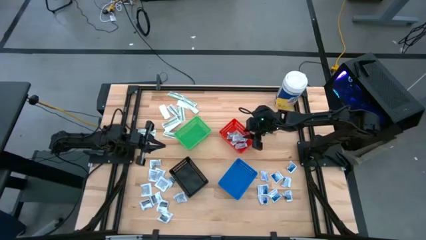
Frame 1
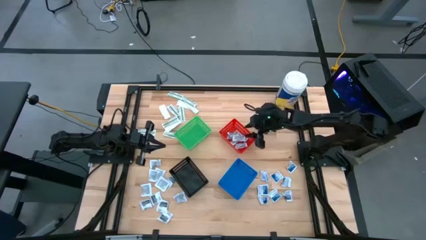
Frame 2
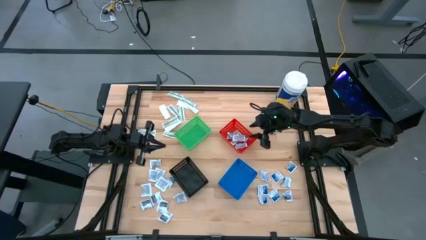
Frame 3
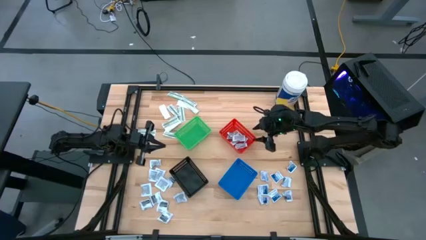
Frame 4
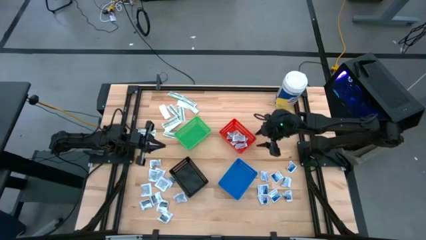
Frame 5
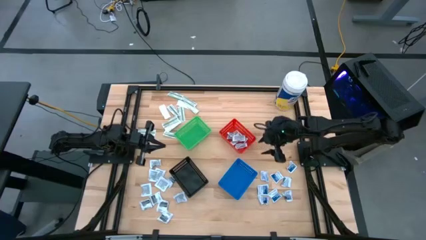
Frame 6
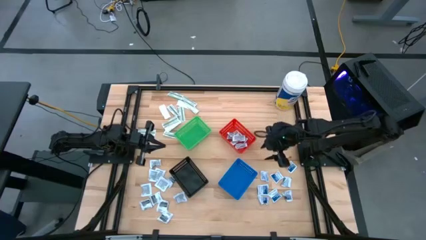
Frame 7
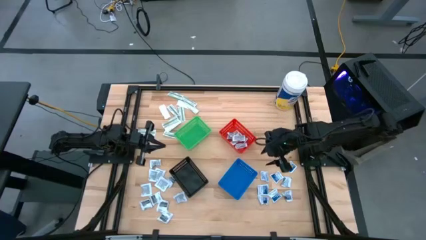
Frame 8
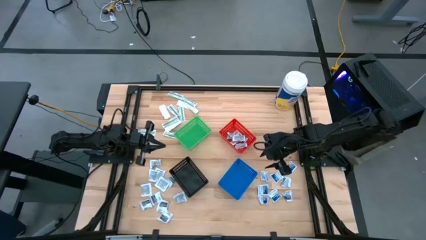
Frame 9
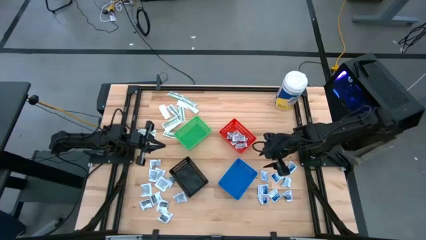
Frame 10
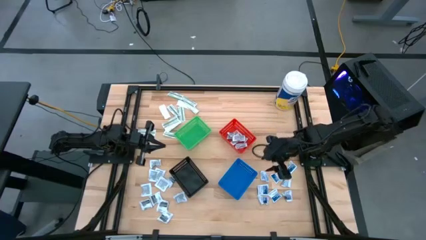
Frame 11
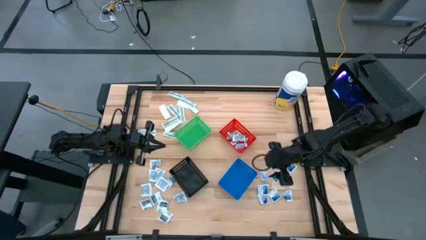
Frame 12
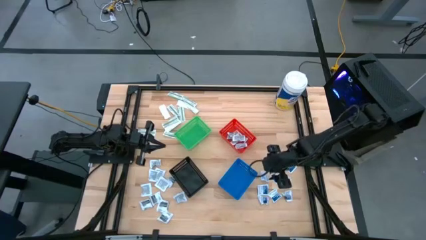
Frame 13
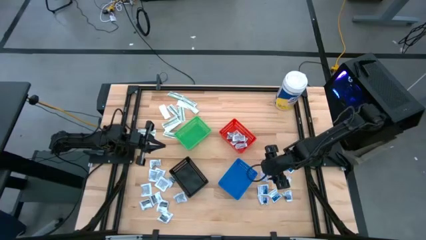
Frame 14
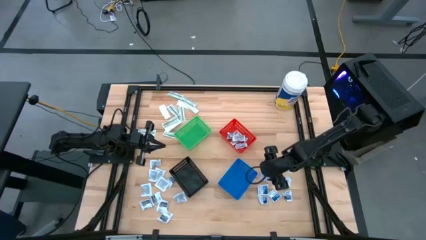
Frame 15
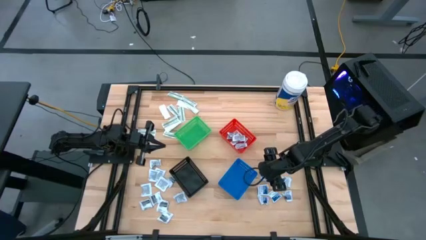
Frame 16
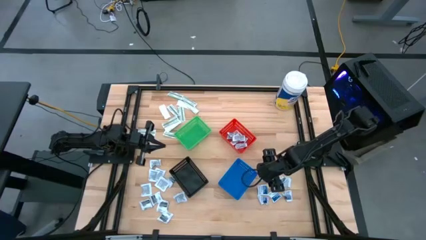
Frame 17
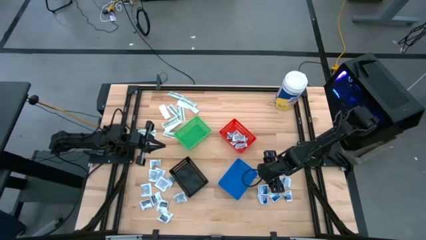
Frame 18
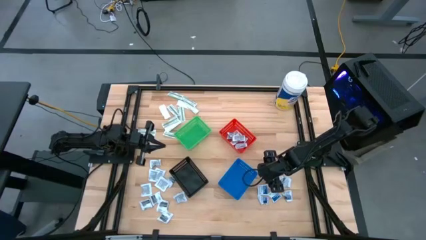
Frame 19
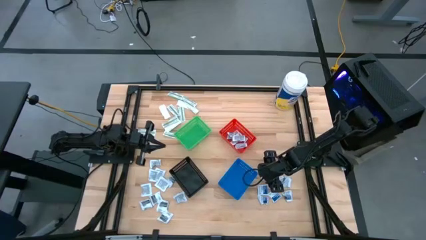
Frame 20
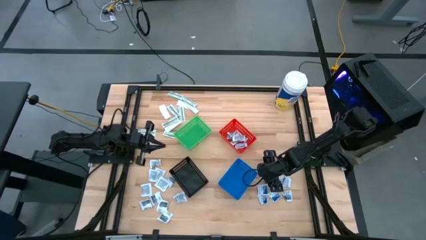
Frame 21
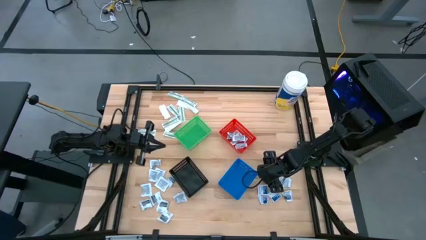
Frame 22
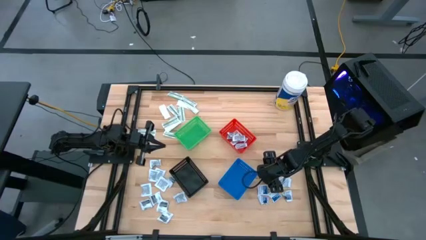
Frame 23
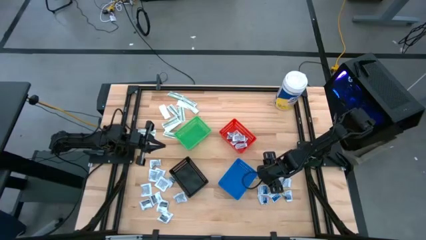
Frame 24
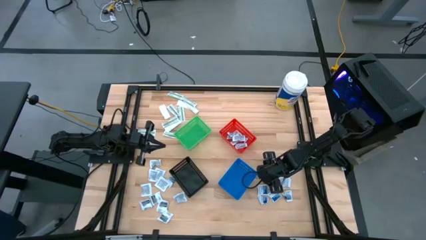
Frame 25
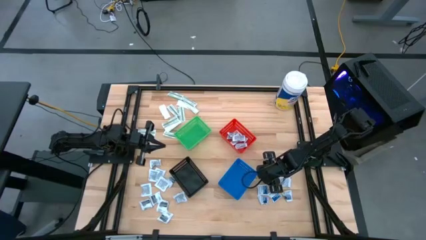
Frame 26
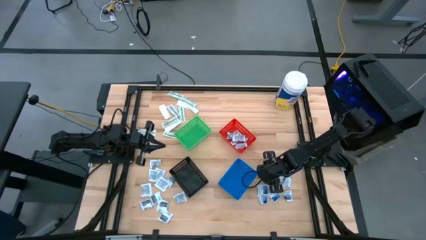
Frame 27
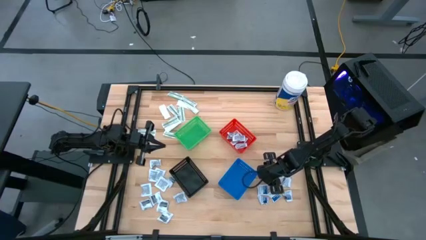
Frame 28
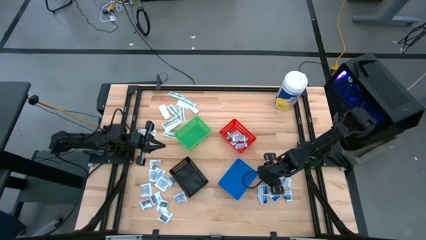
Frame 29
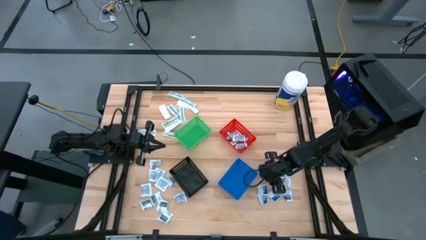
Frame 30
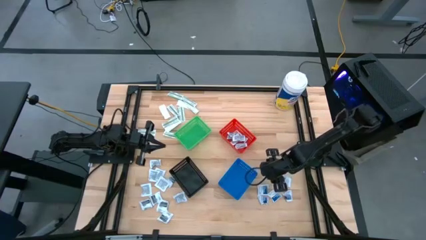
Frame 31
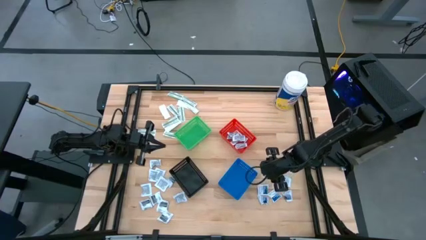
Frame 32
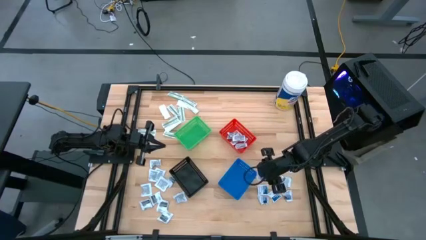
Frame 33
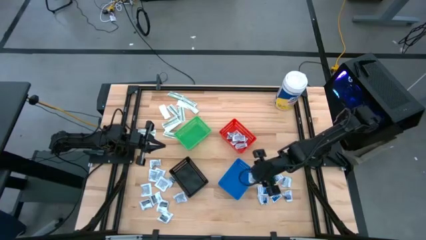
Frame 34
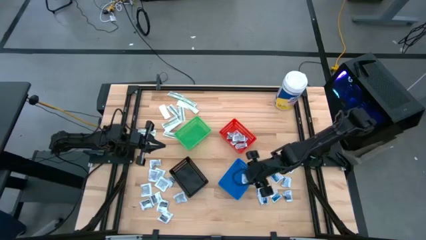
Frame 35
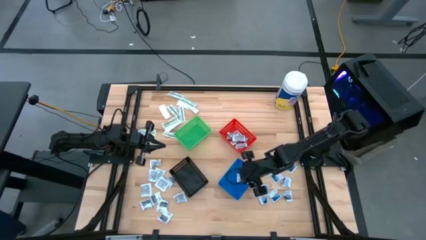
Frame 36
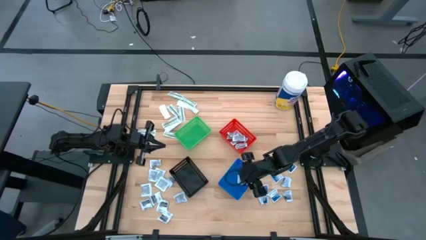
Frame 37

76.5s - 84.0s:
Task: Pick & Place First Aid Supplies
Put the blue alcohol pad into the blue bin

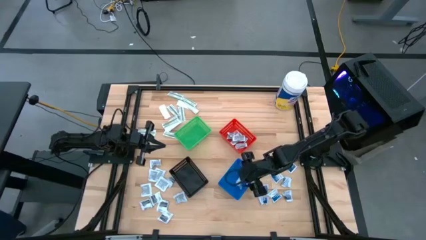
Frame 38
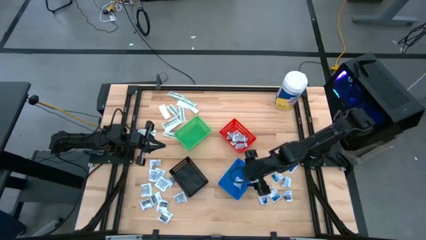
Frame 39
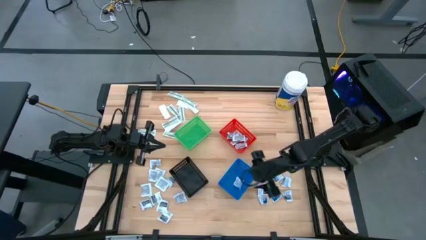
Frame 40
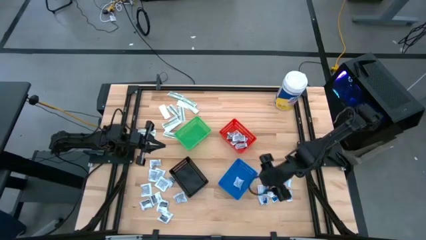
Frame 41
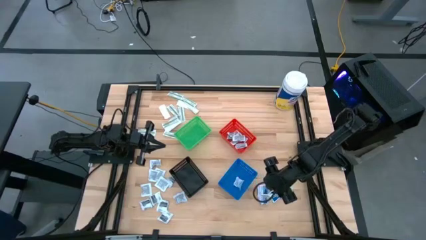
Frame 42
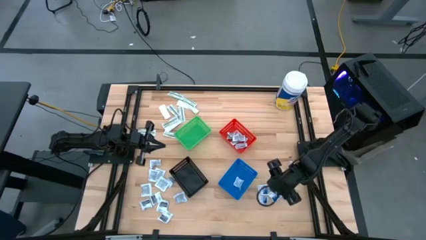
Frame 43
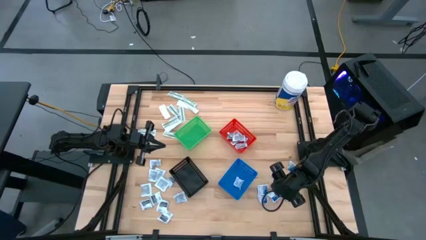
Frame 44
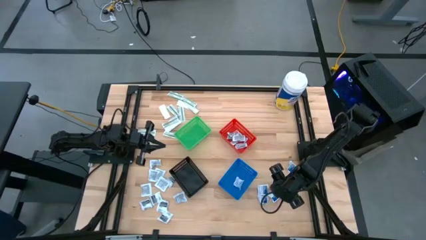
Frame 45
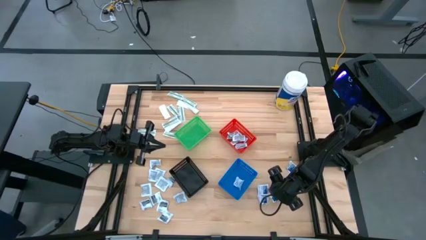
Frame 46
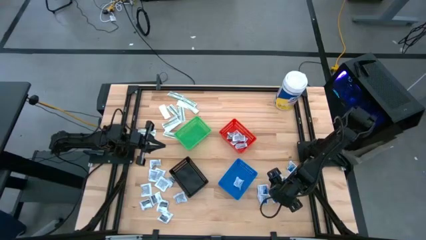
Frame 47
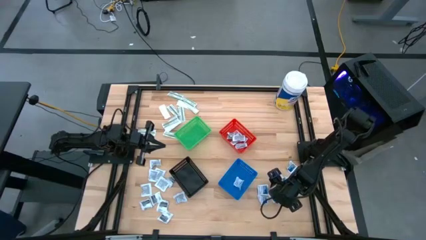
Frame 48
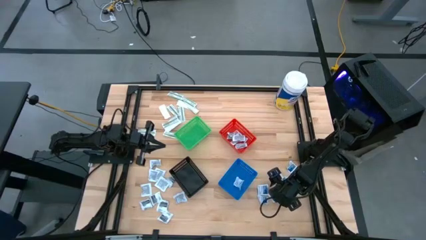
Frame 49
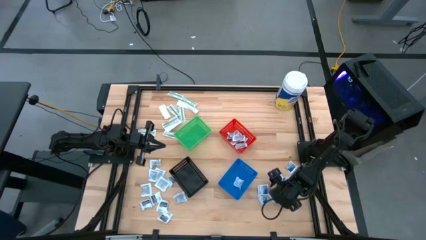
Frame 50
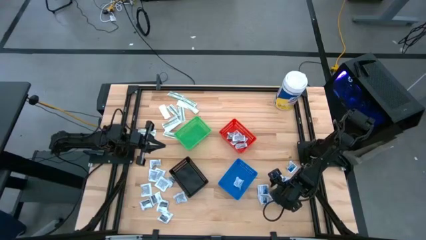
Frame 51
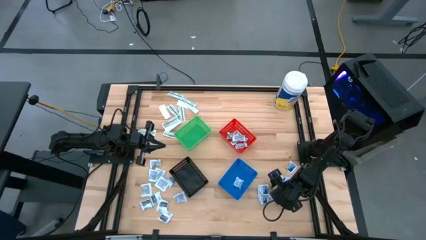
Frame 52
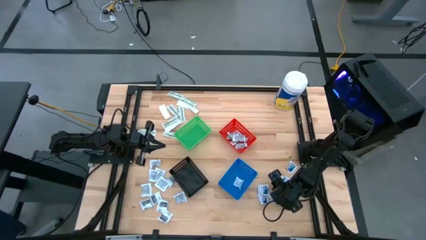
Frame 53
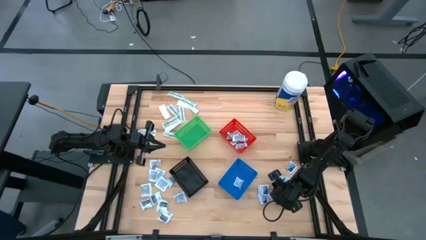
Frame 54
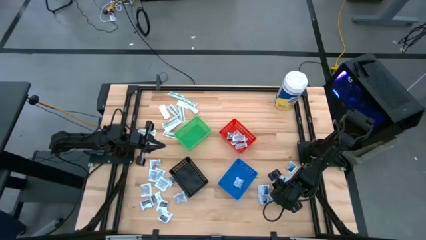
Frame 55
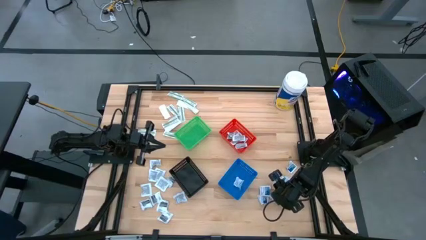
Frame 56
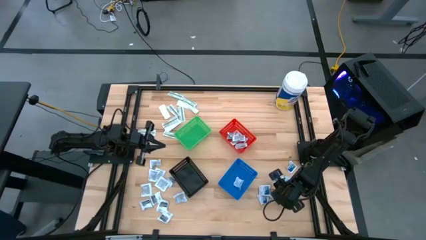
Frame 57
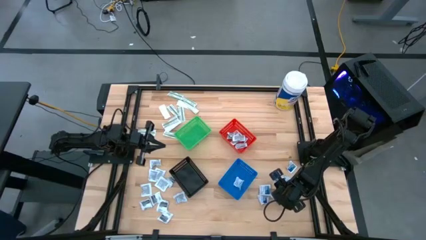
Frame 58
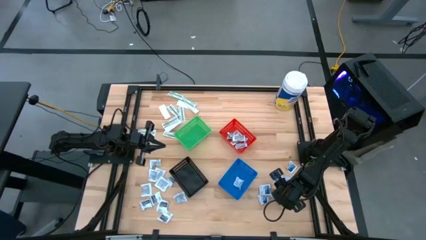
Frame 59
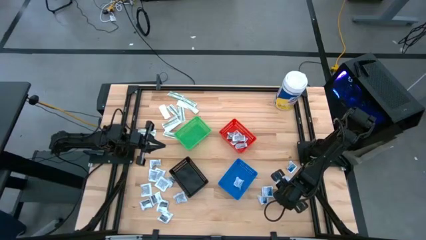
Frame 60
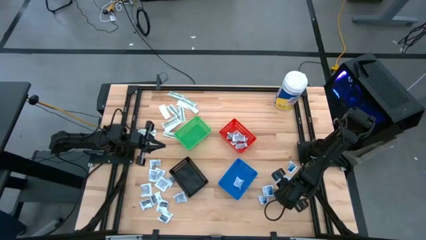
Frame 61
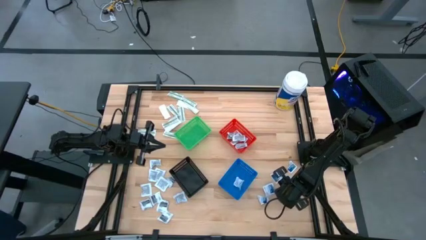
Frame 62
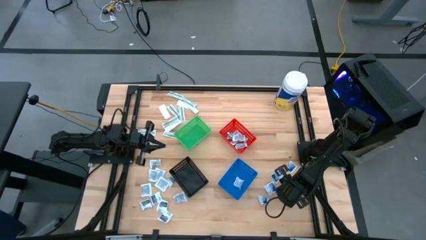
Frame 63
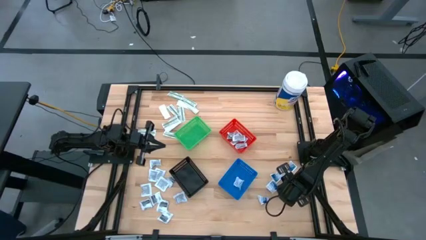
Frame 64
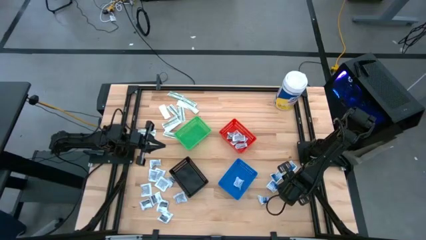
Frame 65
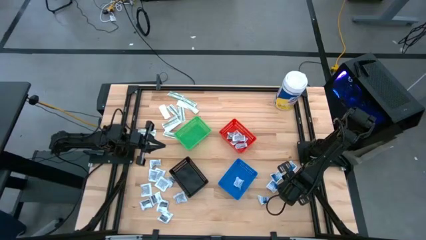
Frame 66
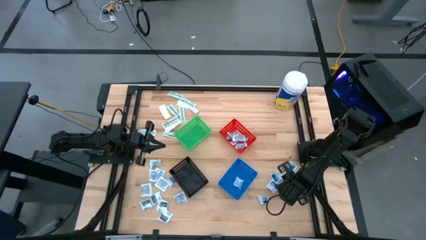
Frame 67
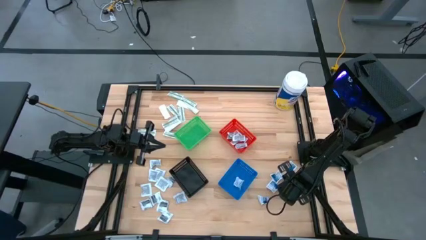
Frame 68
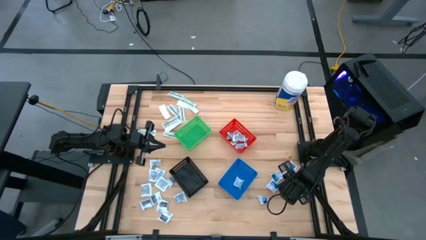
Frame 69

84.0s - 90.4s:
Put the blue alcohol pad into the blue bin

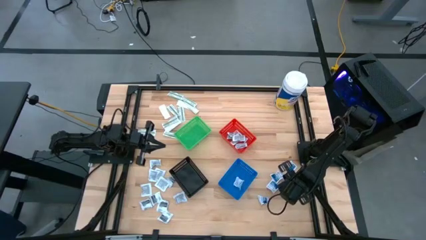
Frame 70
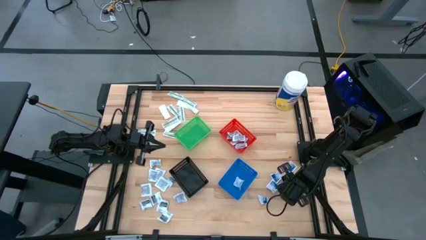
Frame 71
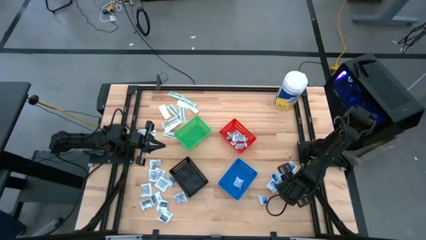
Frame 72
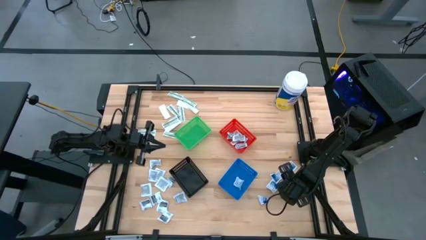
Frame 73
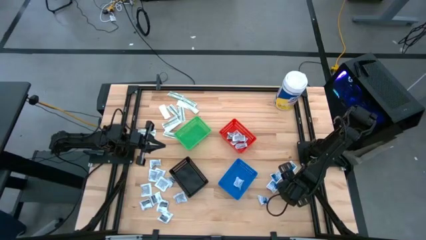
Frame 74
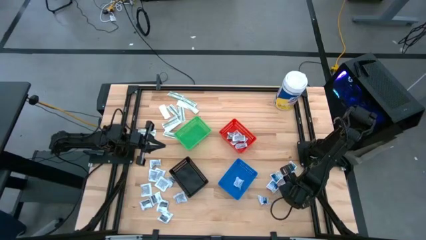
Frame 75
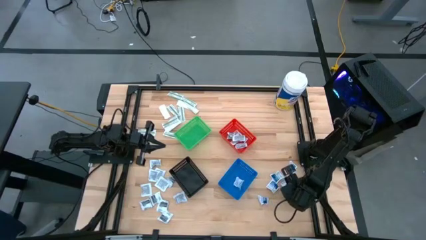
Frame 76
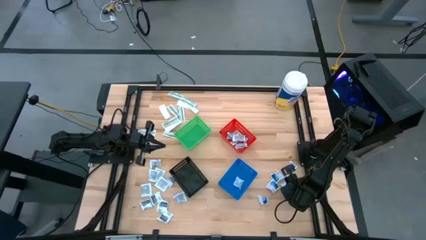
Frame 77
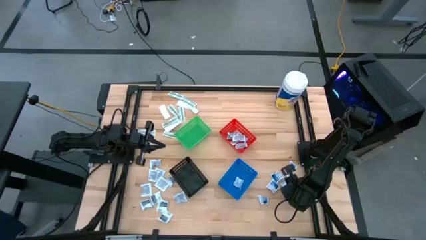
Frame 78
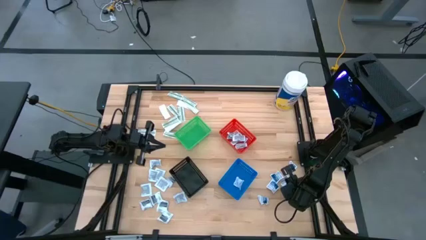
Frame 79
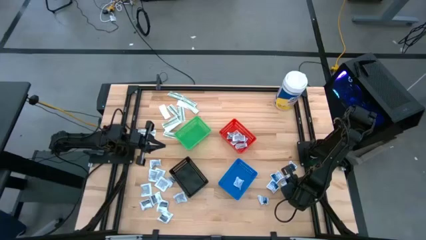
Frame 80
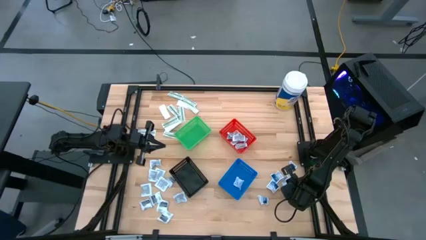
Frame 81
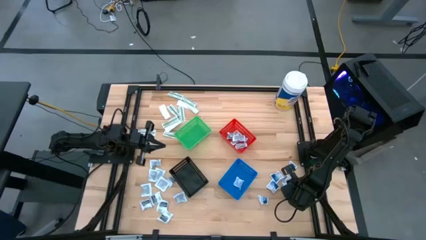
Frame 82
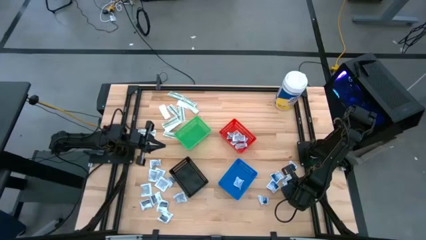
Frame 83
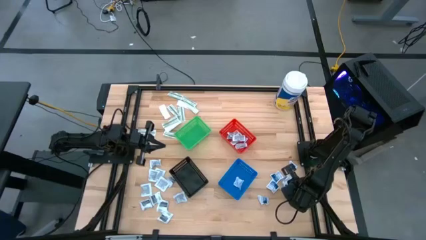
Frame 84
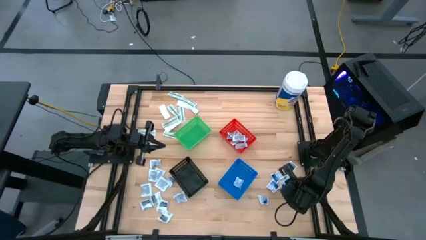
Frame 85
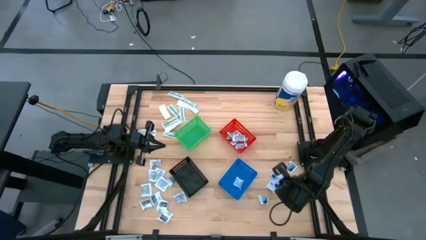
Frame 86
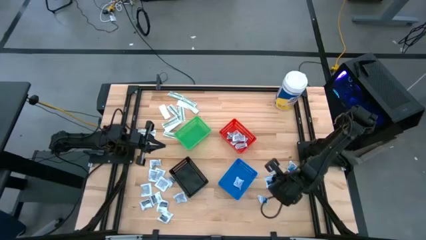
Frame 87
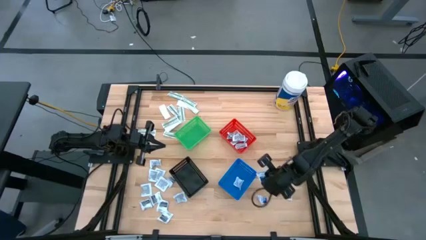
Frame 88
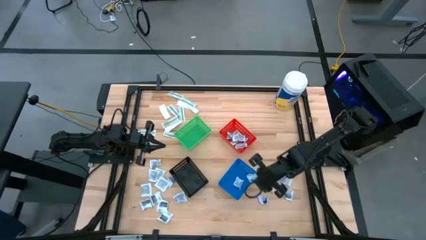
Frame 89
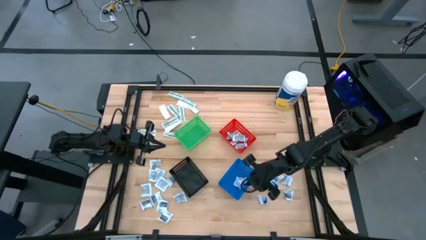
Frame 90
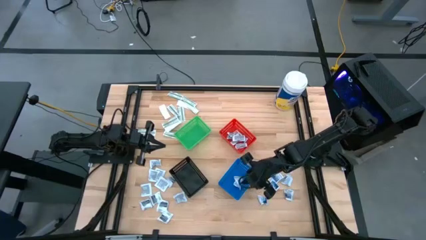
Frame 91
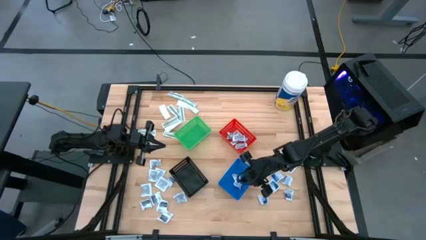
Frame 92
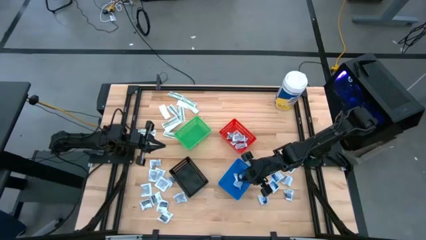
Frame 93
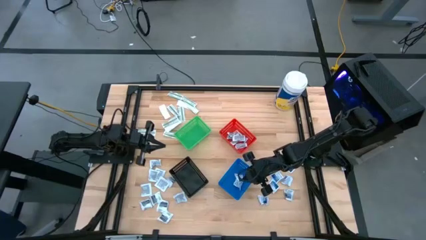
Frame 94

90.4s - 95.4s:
Put the blue alcohol pad into the blue bin
